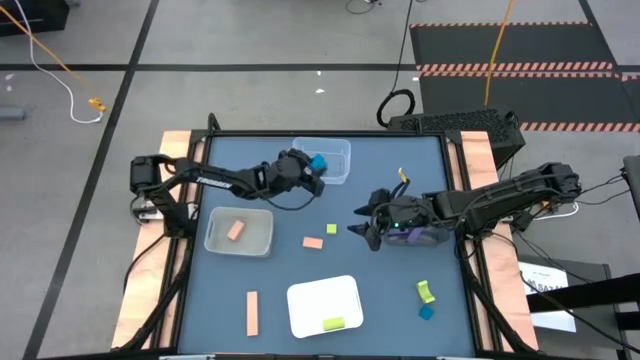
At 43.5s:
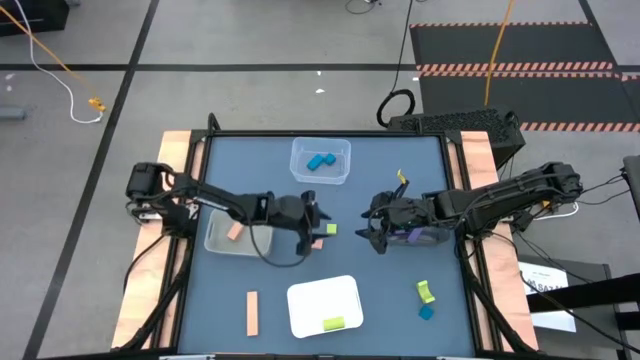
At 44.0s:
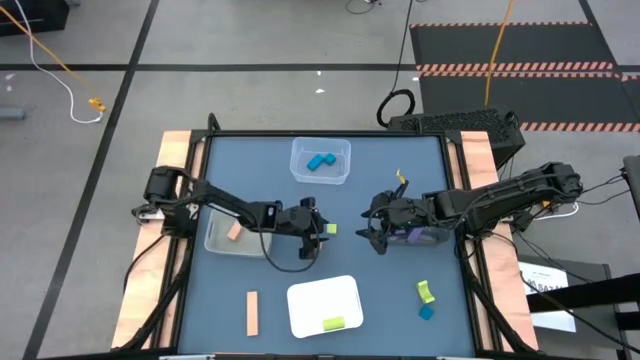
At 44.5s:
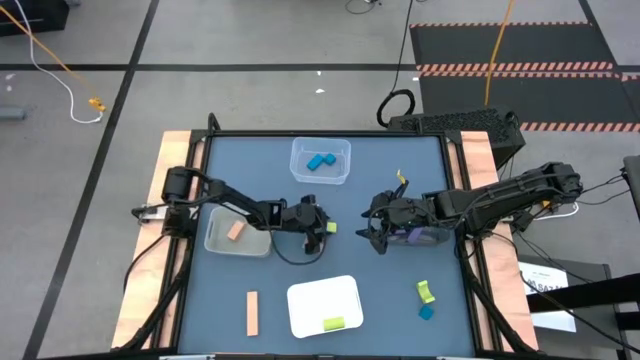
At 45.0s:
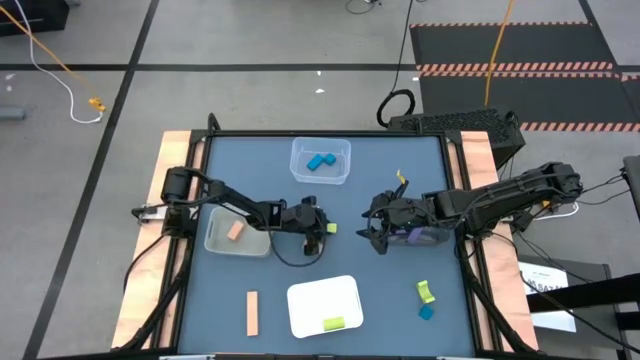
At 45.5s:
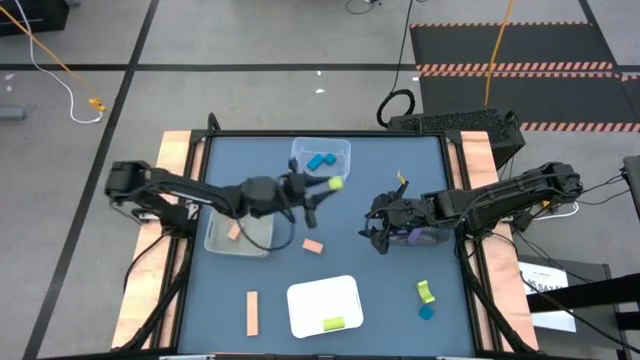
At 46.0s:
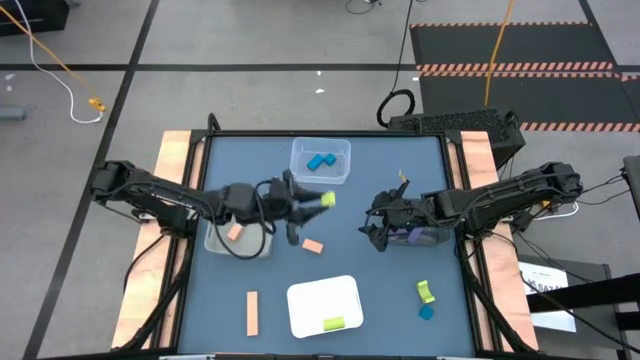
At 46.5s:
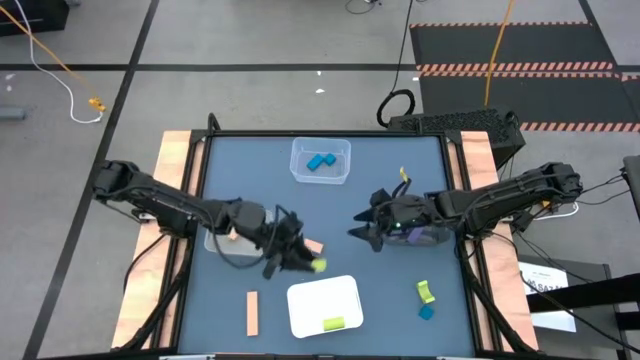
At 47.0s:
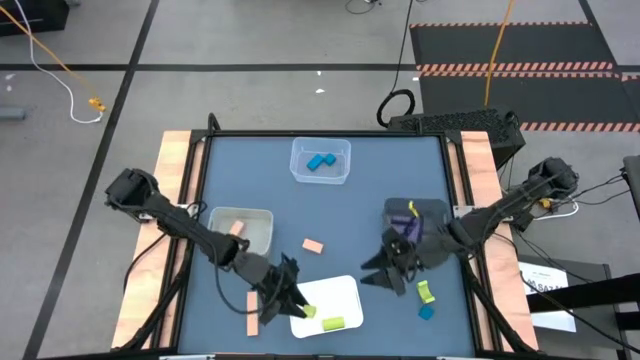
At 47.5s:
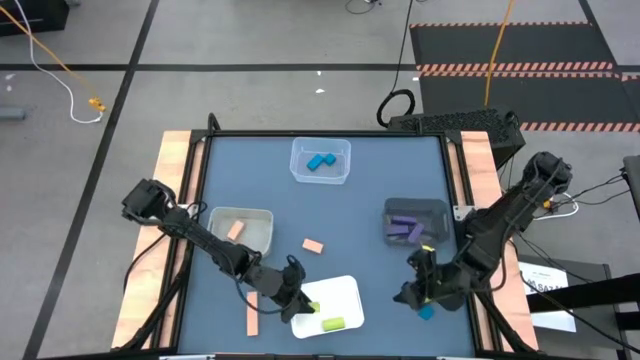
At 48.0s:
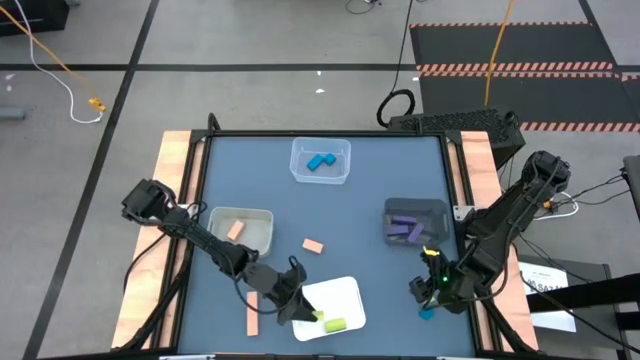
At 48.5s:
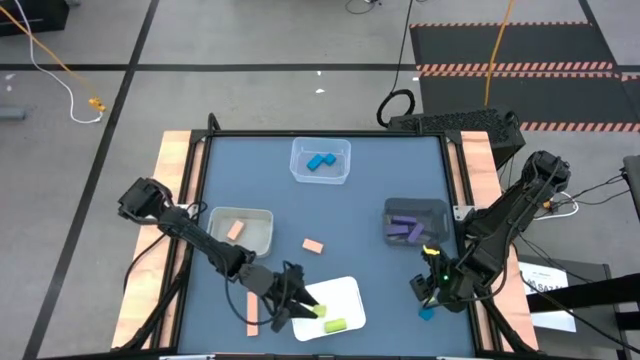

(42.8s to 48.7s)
Task: Sort & place blocks by color
Put the green block into the white bin

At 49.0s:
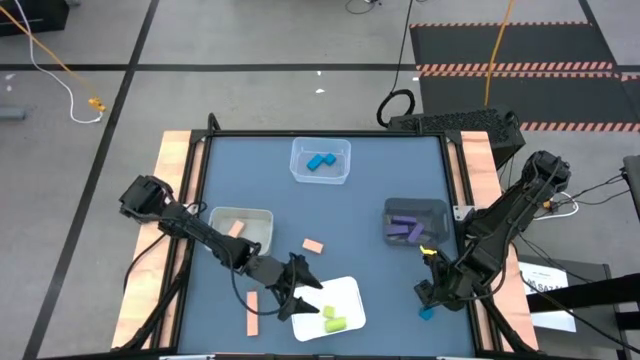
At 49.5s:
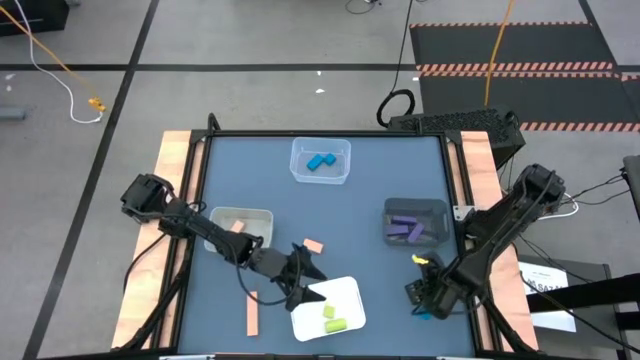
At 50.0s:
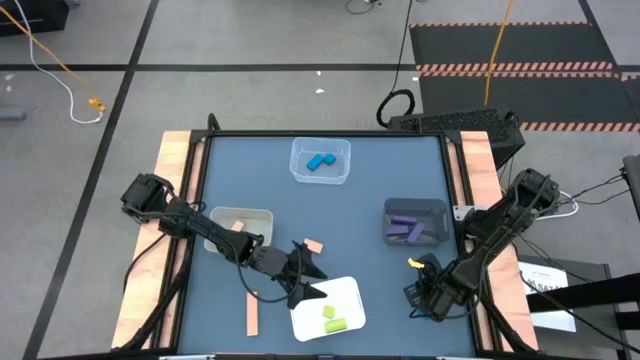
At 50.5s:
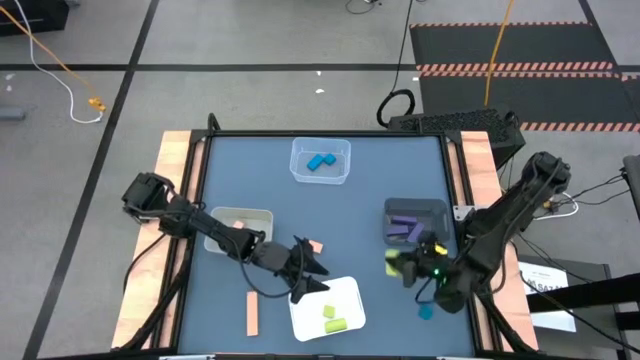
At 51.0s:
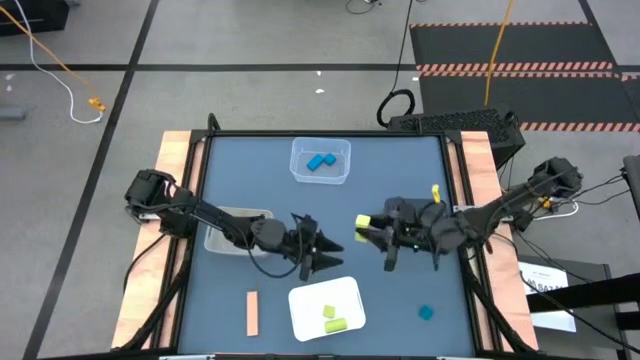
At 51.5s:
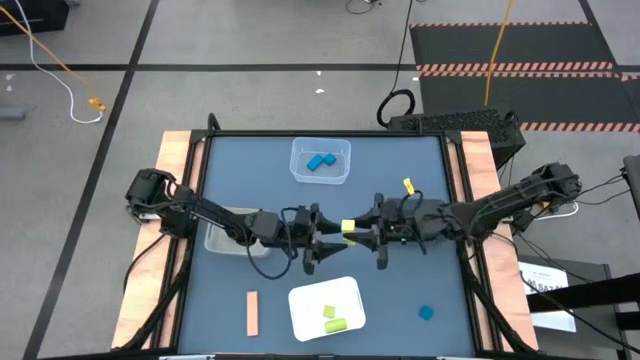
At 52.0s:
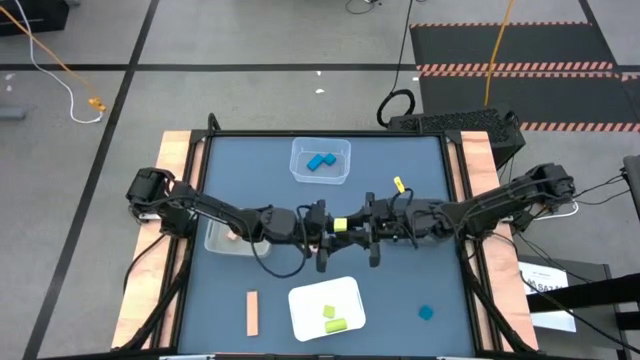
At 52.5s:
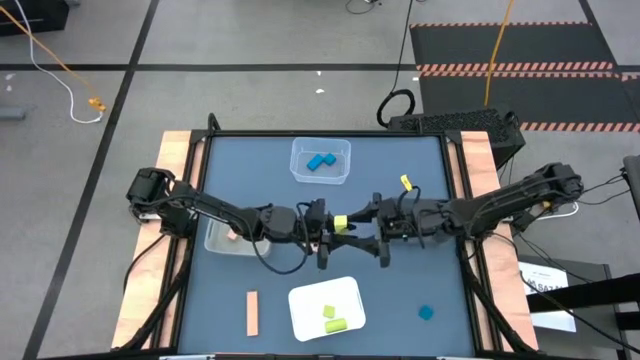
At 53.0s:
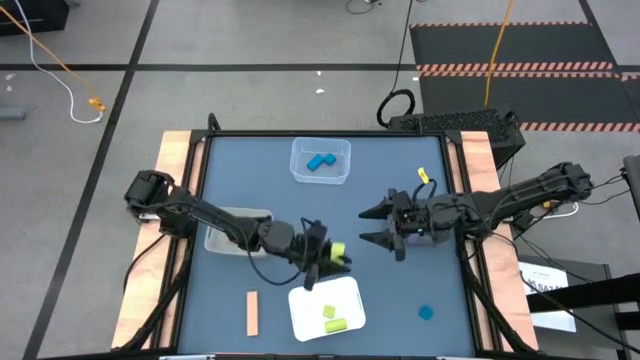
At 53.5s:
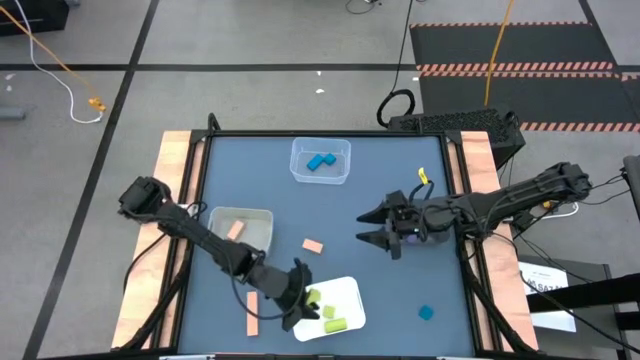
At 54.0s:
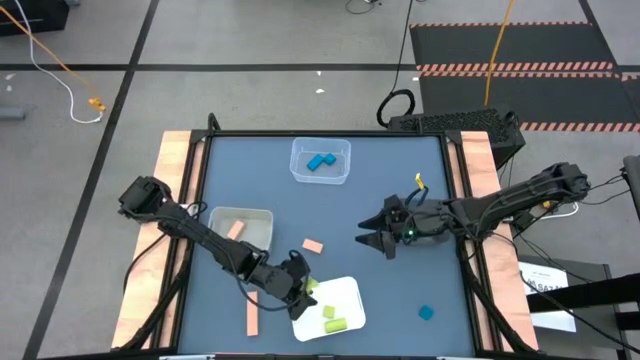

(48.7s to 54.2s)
Put the green block into the white bin

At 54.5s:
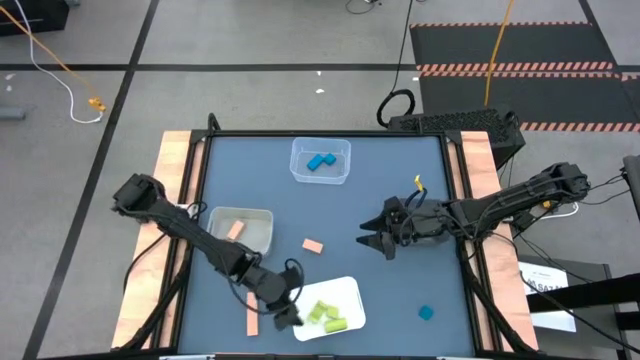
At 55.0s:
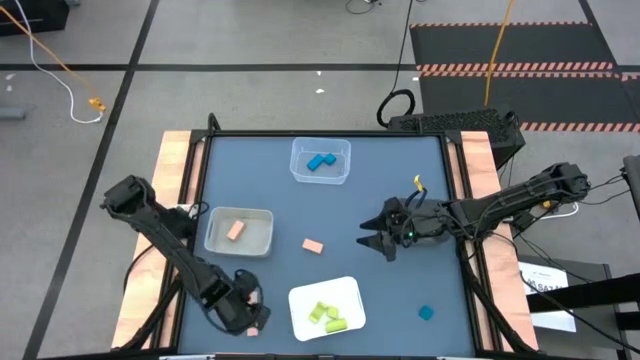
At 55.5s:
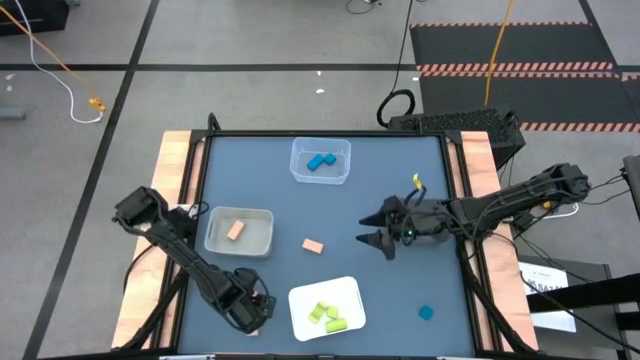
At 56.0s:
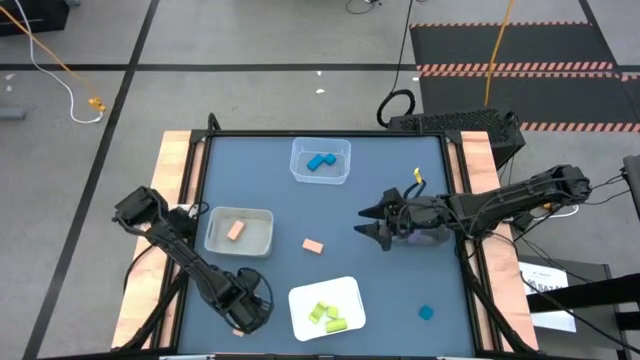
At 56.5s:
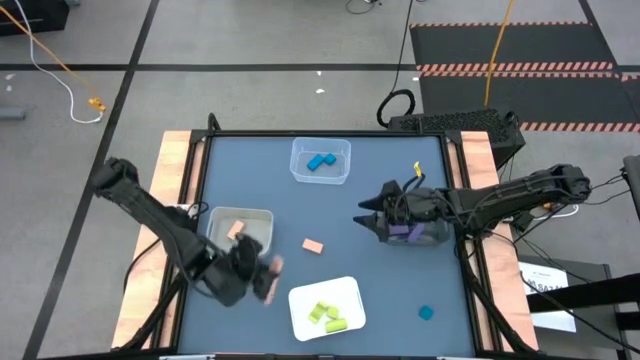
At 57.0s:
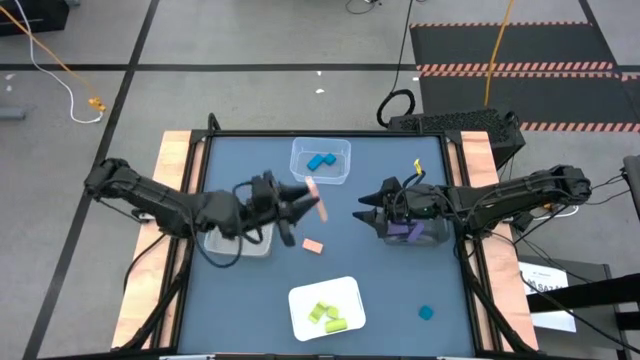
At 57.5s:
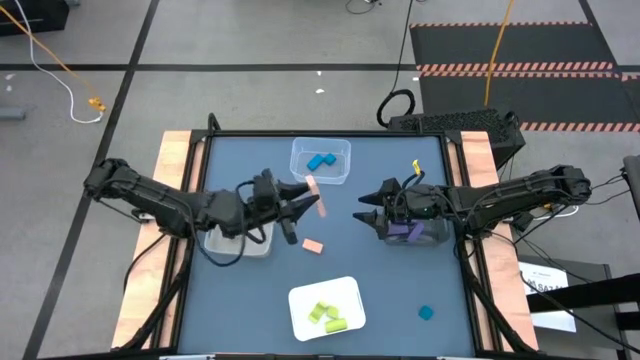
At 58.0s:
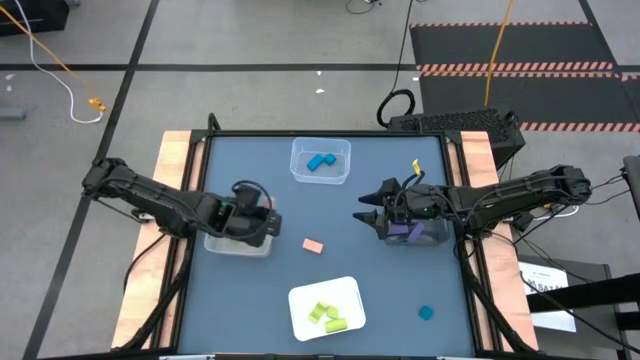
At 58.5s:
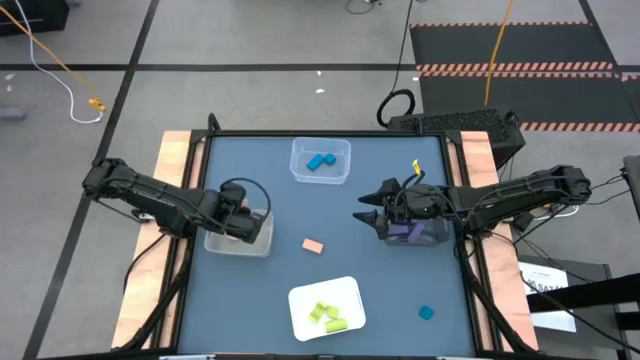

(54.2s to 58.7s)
Put the bottom wooden block into the gray bin

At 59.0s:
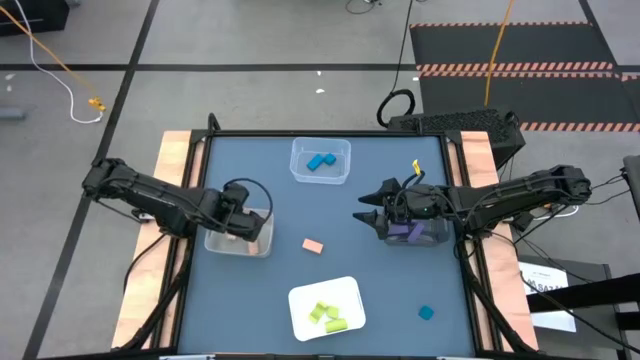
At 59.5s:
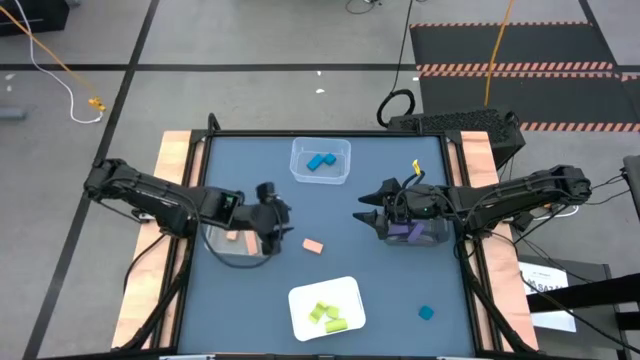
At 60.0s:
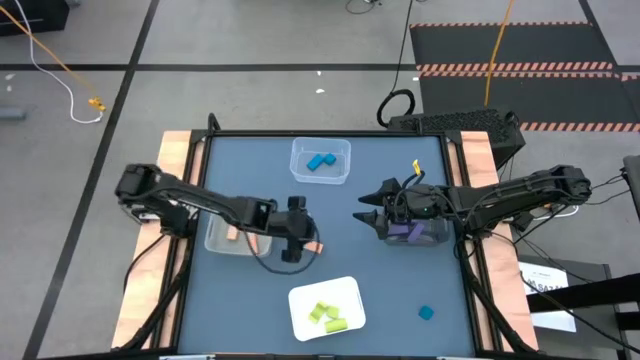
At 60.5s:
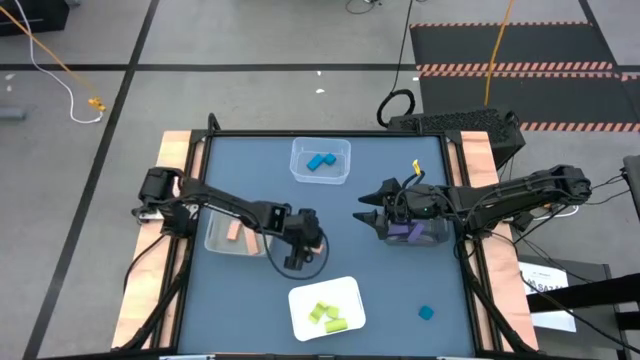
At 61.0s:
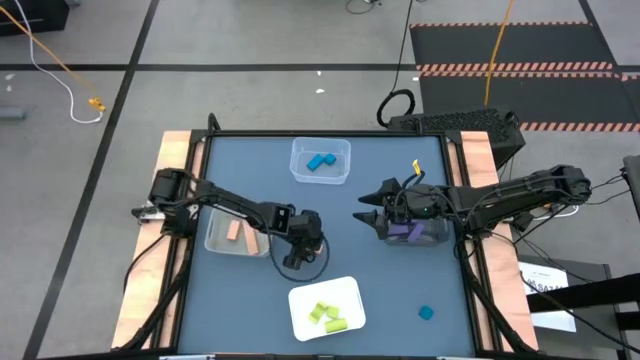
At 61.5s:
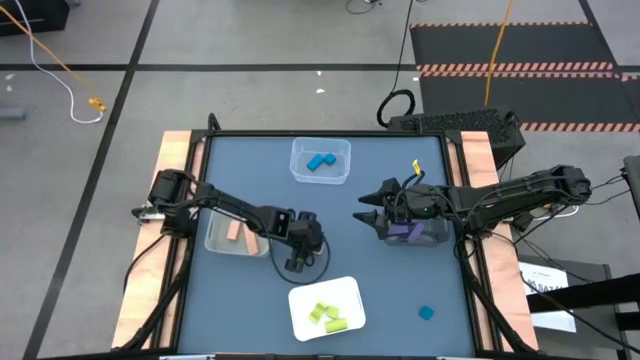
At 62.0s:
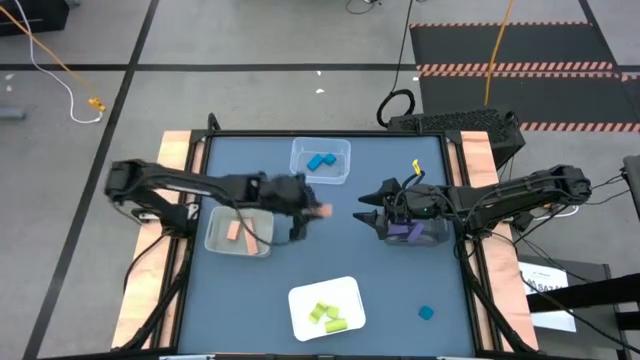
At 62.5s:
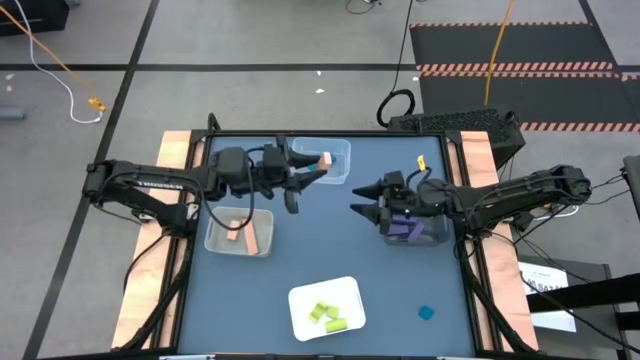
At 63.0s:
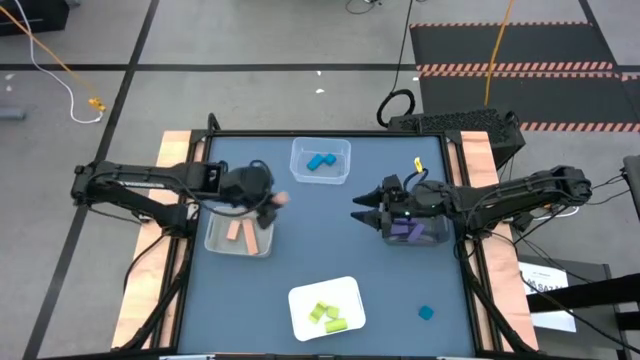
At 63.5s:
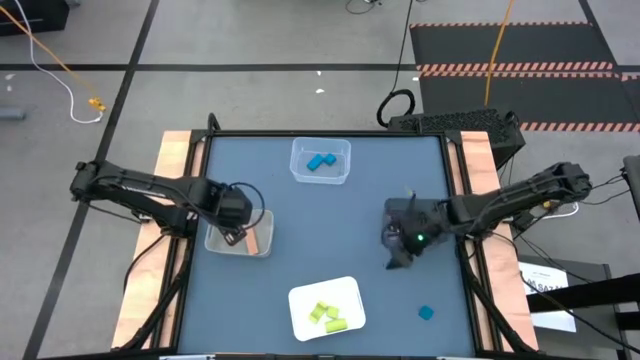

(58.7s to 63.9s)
Put the wooden block into the gray bin

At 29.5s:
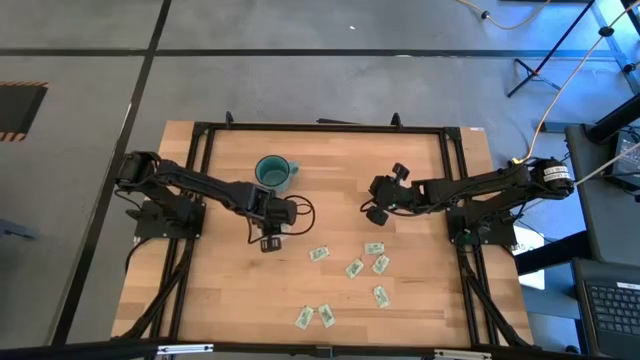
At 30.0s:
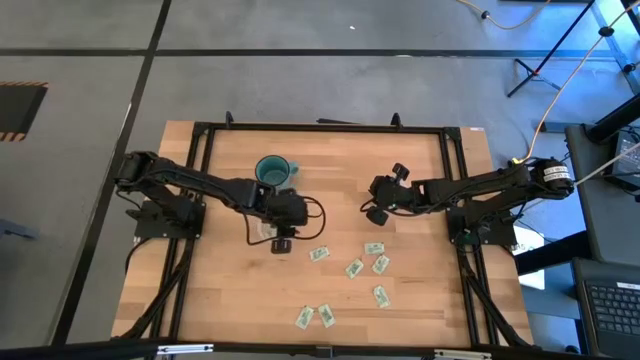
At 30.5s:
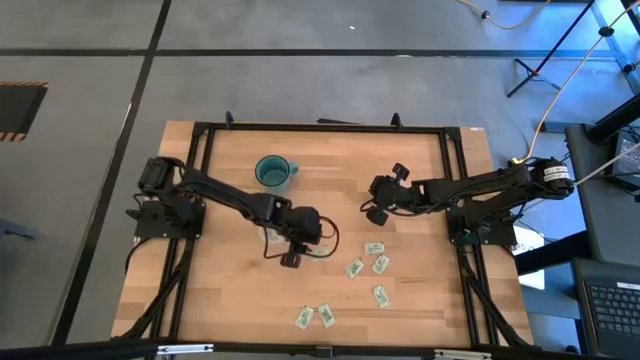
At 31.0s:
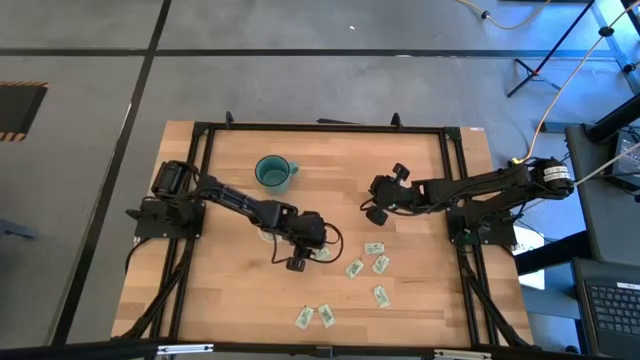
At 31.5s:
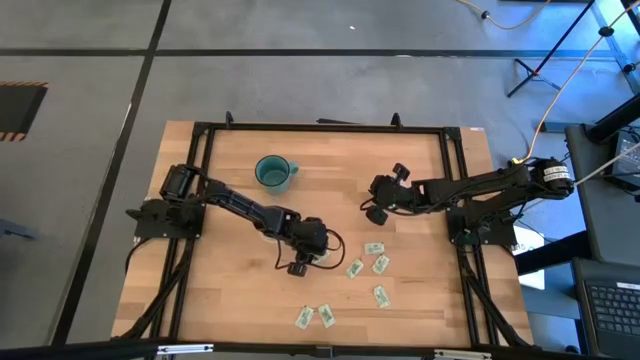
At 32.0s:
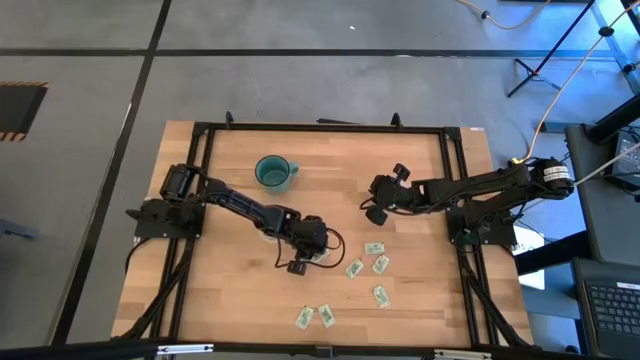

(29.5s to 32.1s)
Task: Pick and place Stevia / Truvia into bins
Put the white stevia packet into the left transparent container
